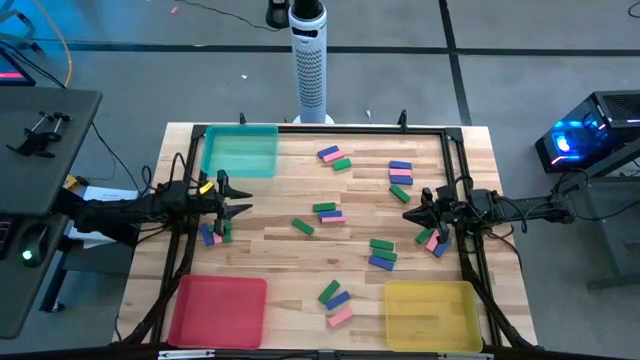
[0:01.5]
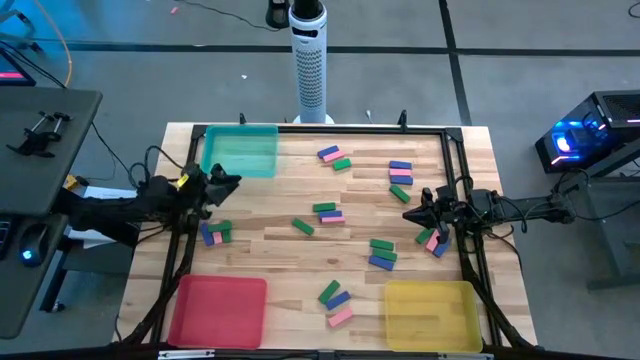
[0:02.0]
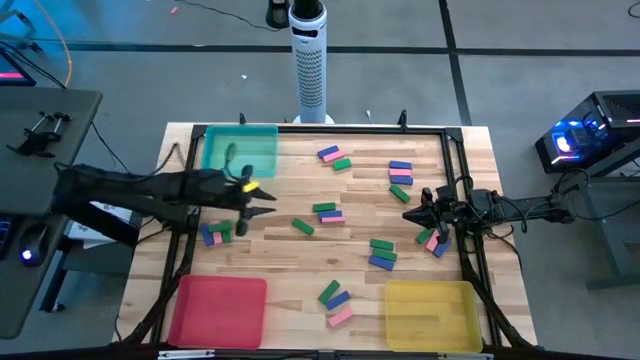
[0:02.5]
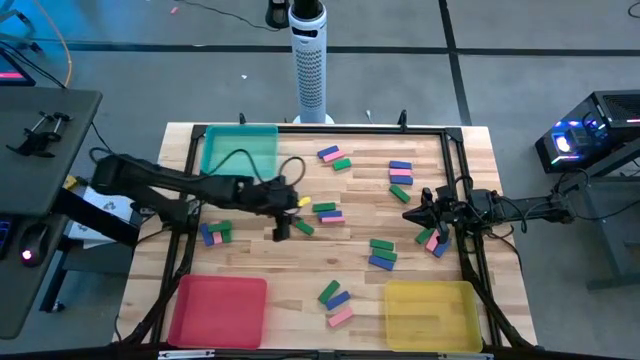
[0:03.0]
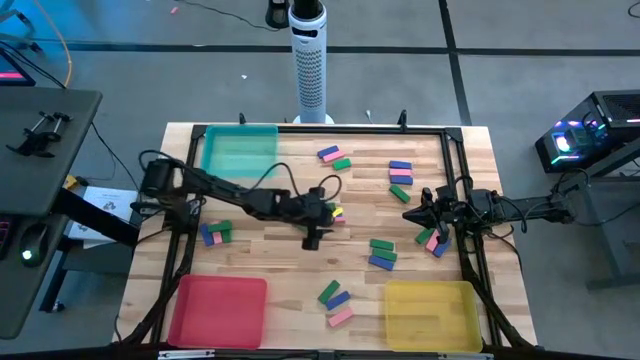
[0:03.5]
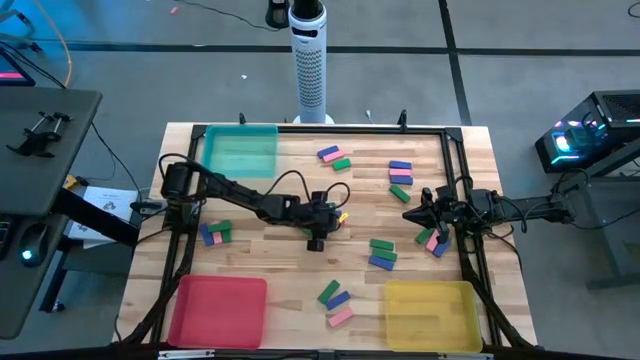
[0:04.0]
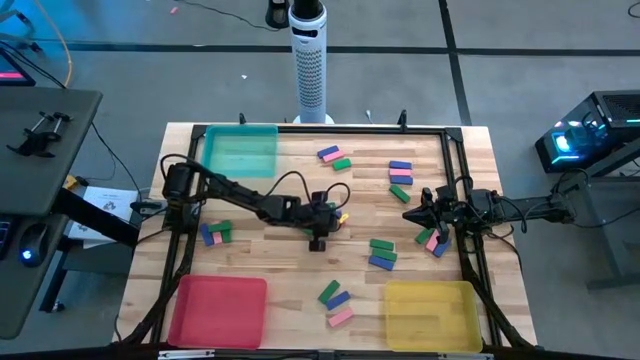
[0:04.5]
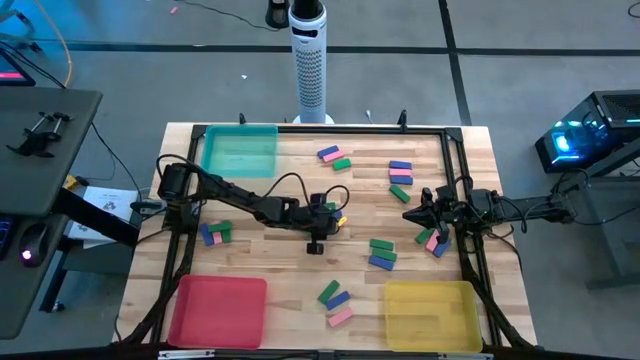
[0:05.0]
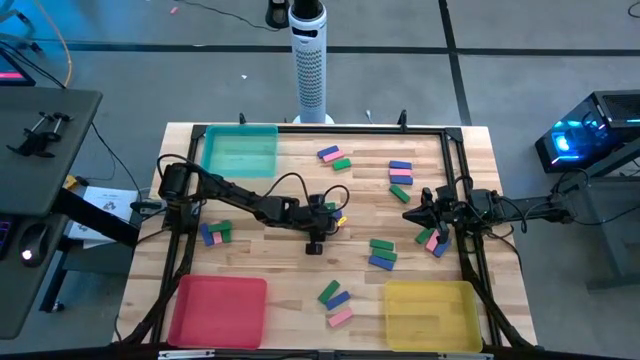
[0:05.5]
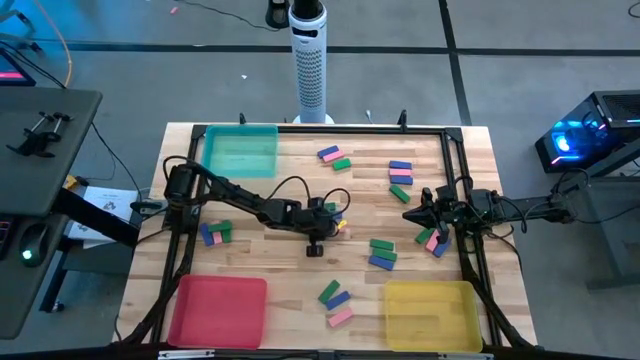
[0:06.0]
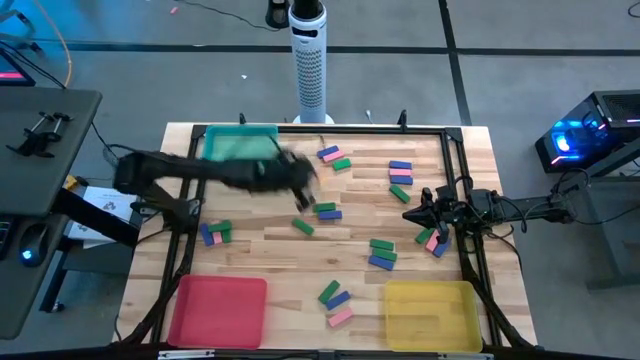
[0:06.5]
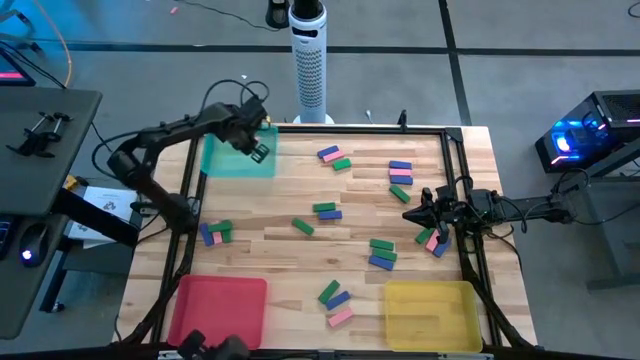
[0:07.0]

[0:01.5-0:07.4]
Task: Sort blocks
Put the pink block into the green bin

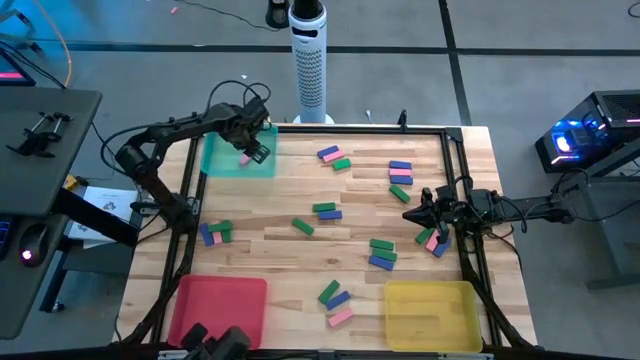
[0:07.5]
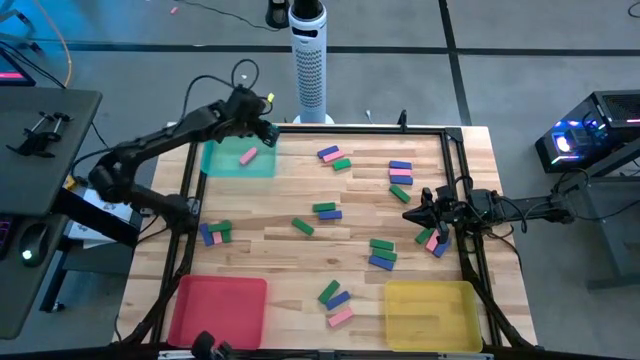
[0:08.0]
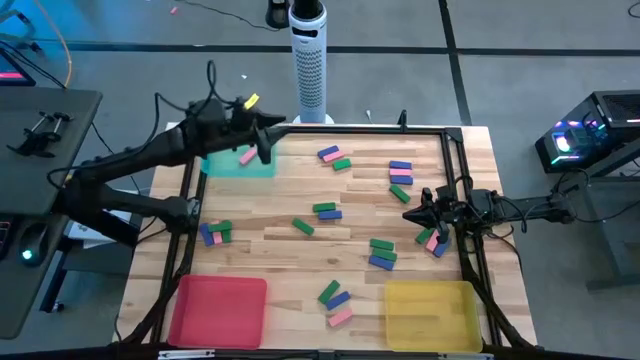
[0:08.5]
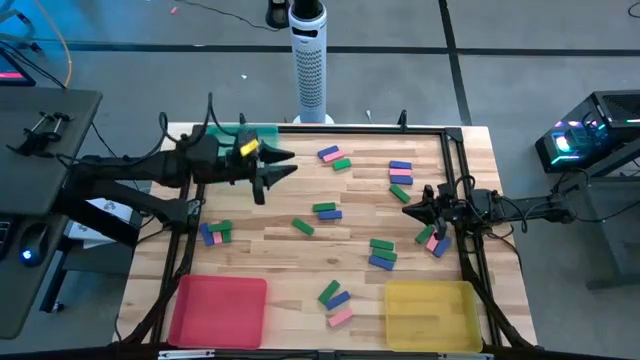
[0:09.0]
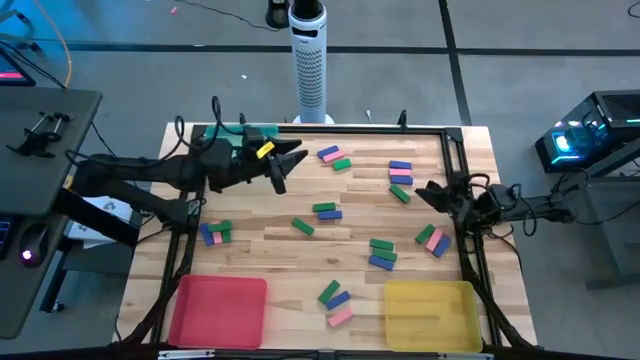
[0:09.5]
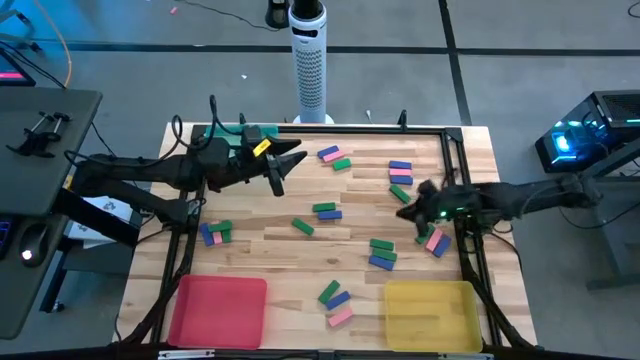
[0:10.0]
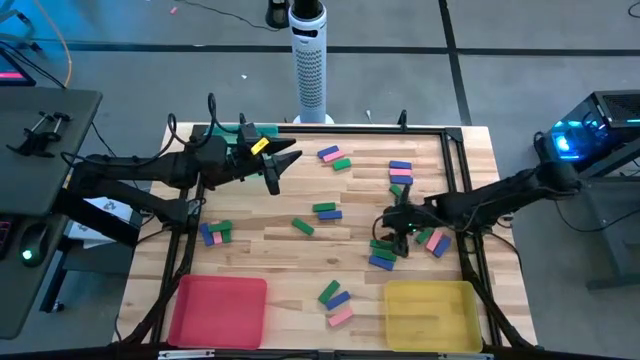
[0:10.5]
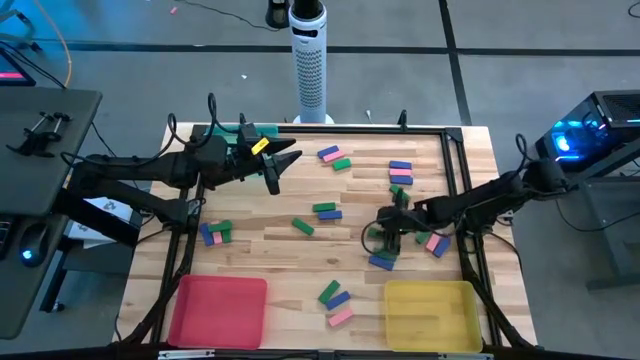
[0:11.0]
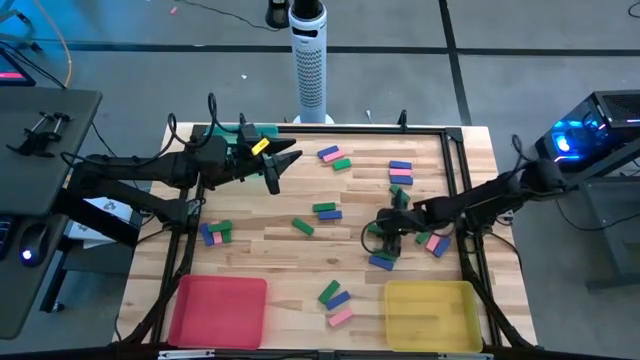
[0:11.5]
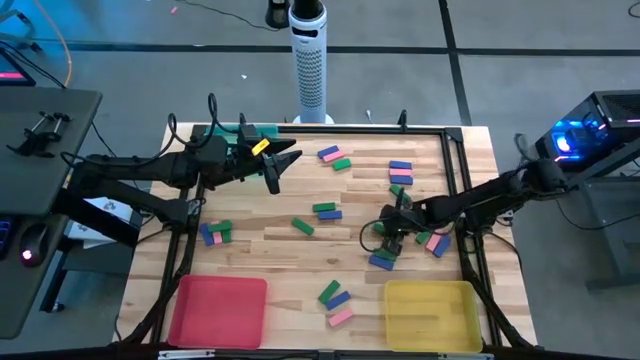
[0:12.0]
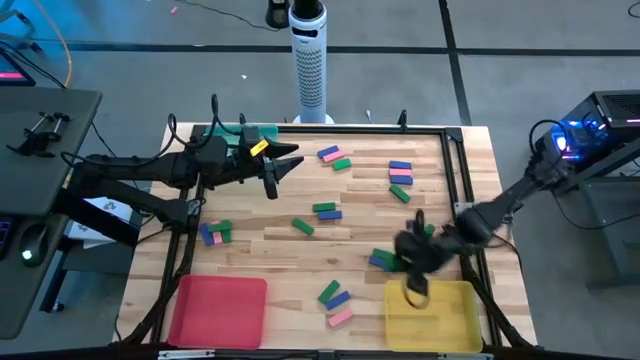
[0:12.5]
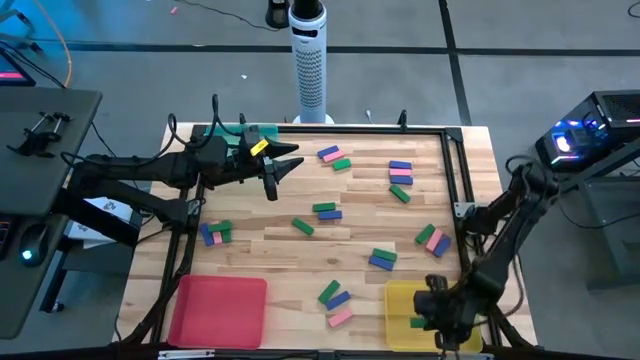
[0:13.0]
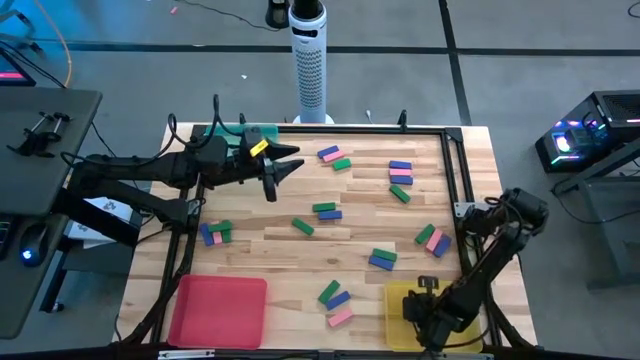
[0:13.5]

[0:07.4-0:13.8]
Put the green block into the yellow bin

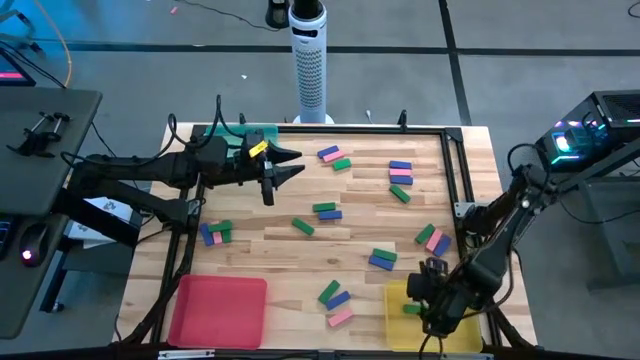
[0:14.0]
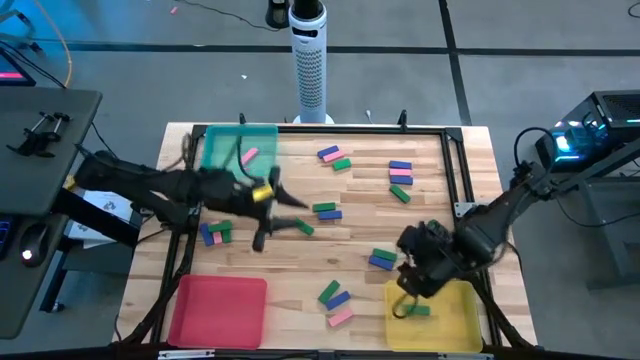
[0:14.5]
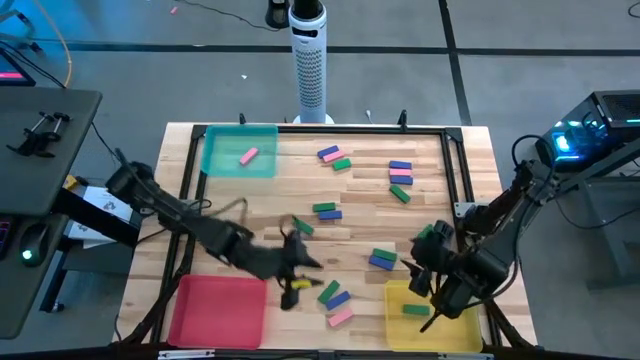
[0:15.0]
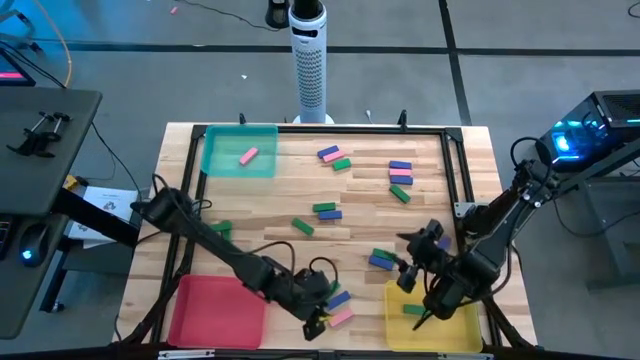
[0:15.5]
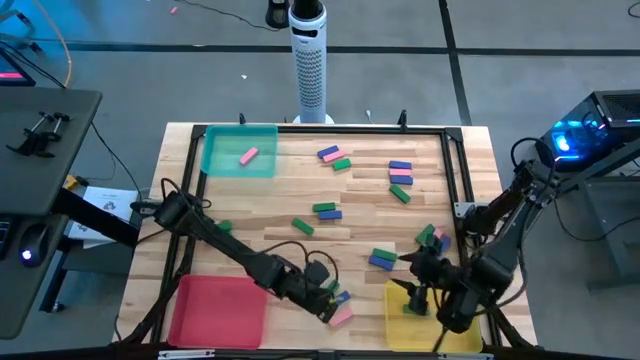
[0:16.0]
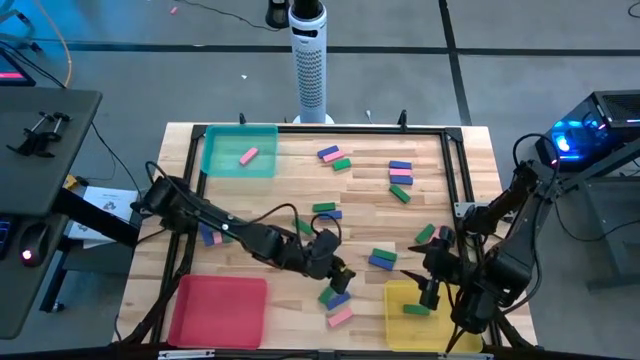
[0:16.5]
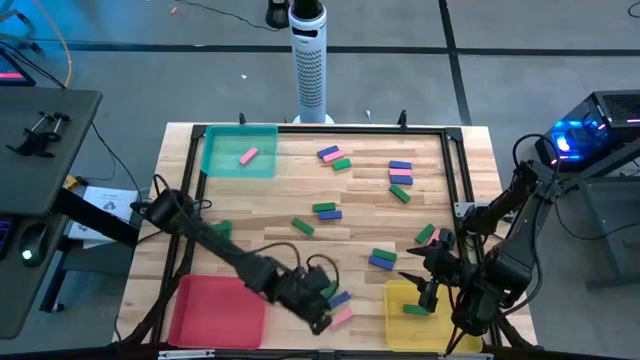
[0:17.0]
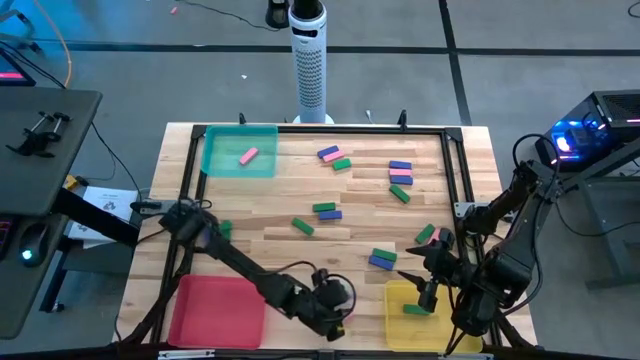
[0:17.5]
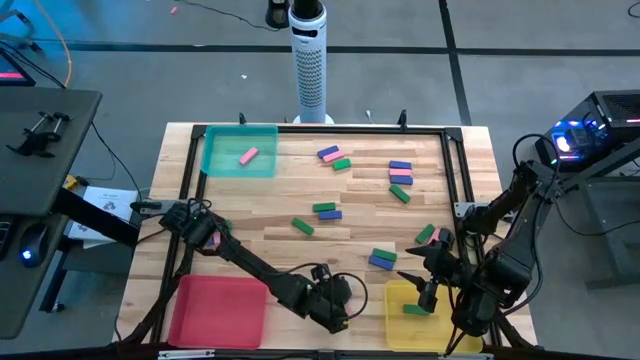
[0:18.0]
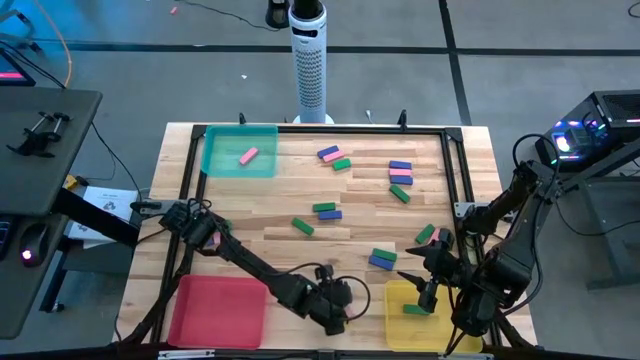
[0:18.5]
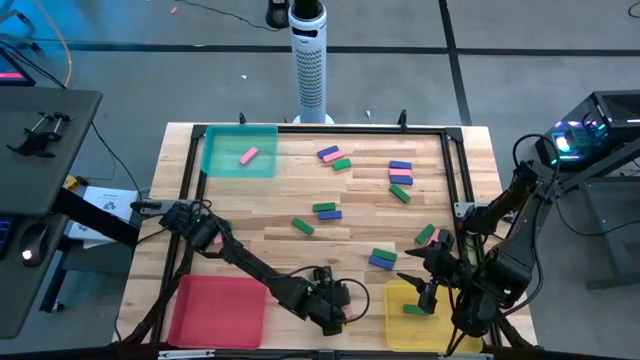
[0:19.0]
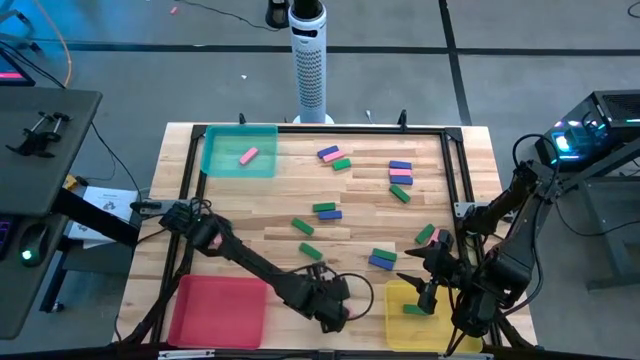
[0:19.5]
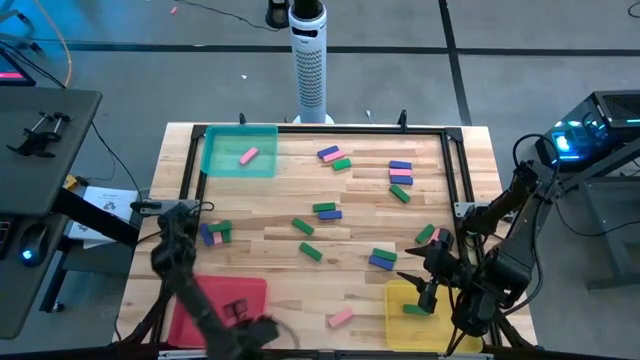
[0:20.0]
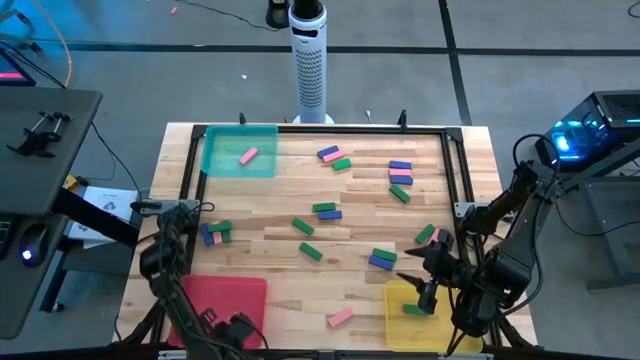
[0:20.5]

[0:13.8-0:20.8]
Put the blue block into the red bin
